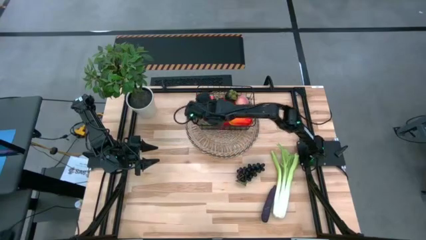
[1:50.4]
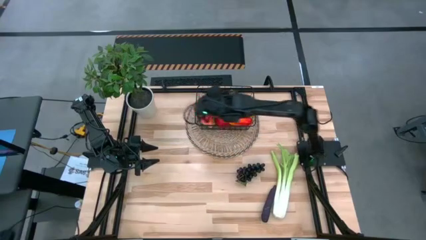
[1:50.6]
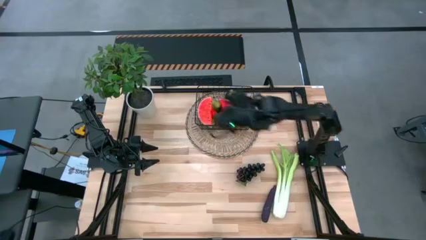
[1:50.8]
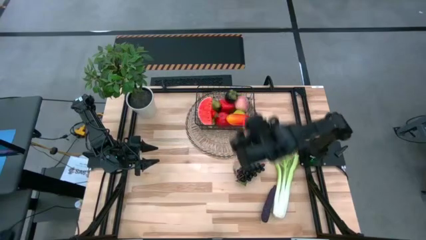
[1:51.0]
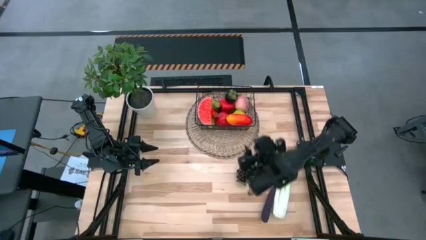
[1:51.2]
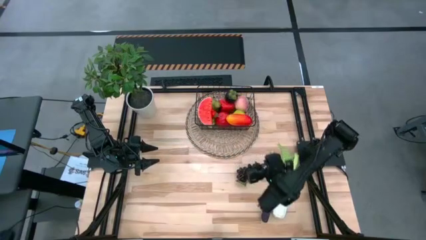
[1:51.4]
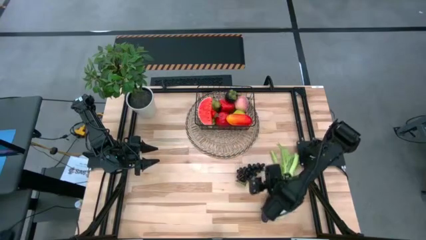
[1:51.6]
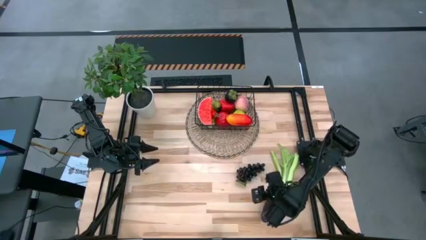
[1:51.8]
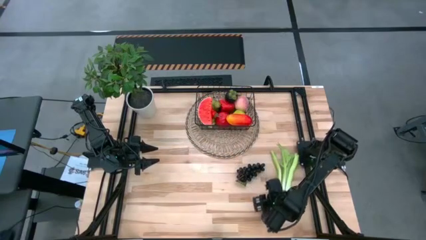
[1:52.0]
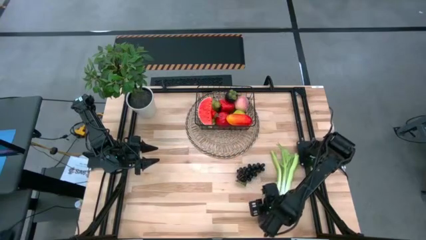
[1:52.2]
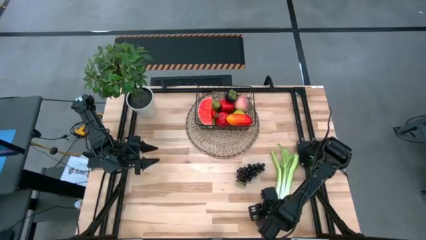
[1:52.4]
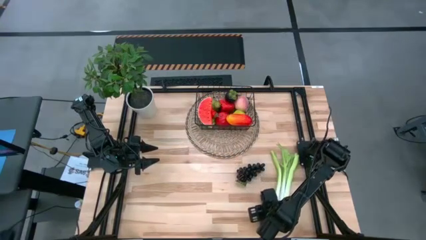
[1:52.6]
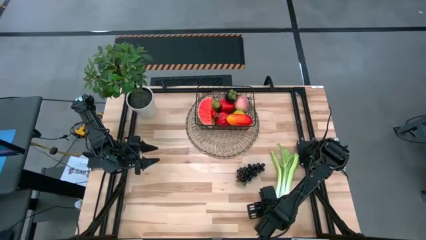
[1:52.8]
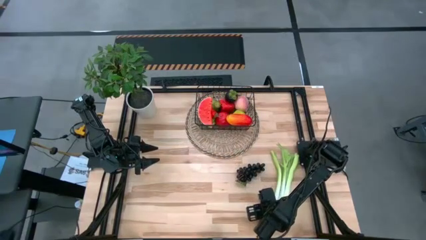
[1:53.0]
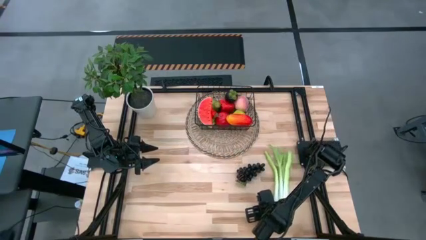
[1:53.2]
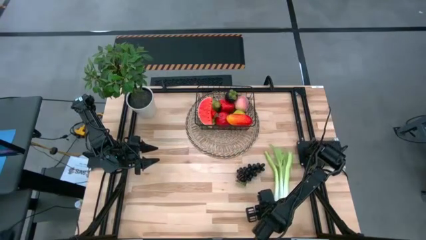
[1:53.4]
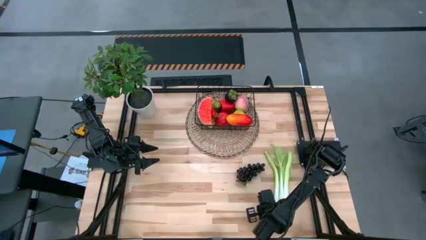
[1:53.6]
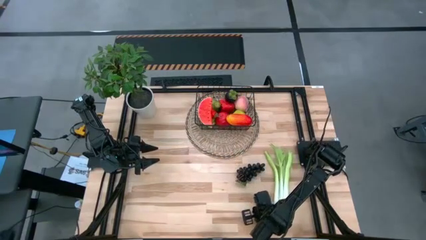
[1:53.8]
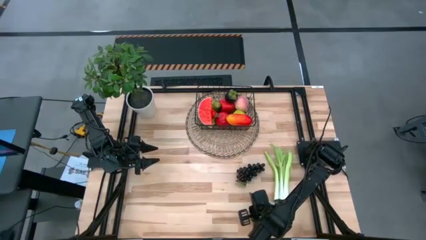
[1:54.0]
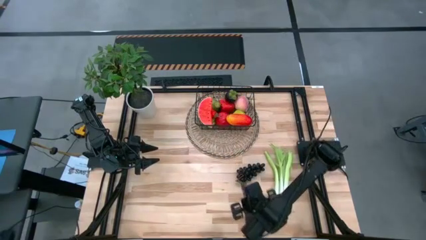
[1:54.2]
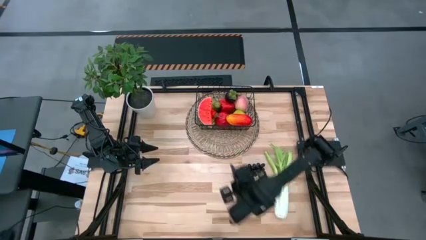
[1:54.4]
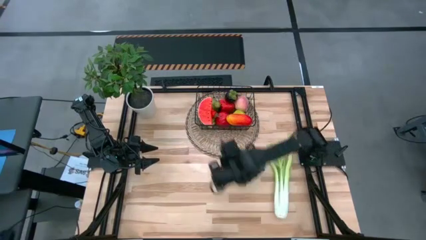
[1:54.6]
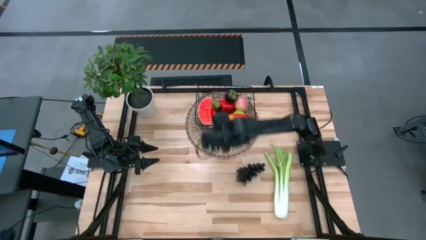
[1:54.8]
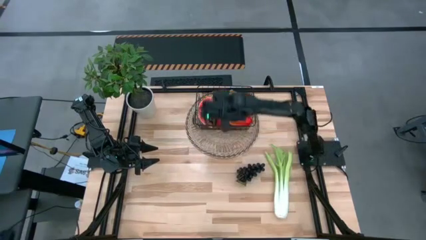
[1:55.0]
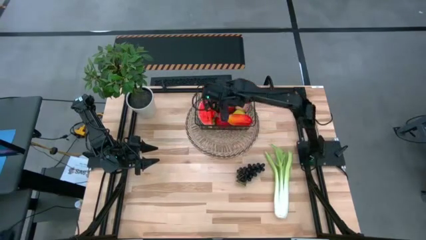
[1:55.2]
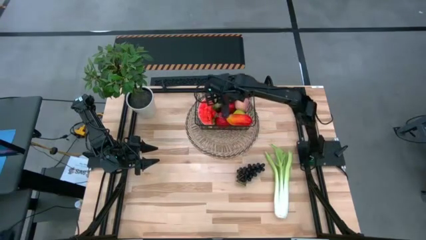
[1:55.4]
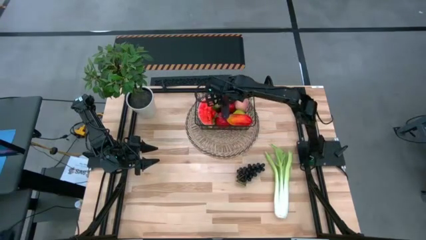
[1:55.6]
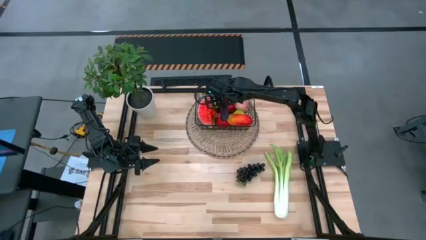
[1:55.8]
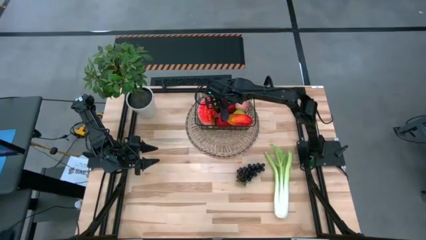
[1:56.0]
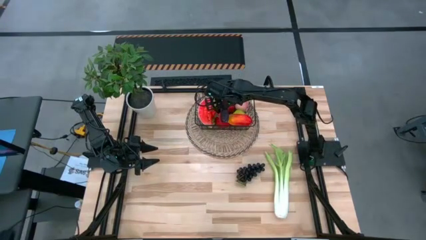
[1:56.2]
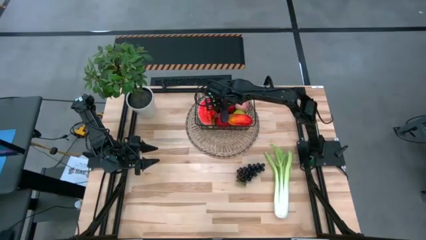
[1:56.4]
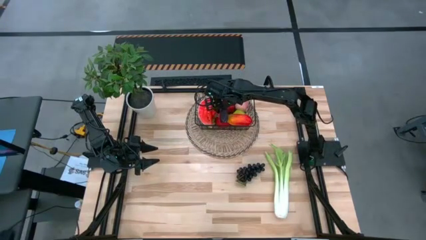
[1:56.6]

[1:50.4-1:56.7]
Task: Build produce basket
Put the purple eggplant into the black wire basket

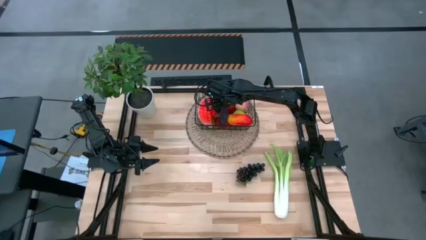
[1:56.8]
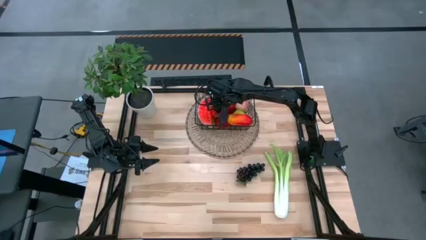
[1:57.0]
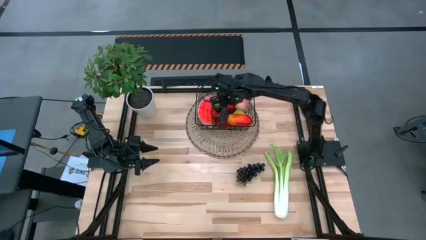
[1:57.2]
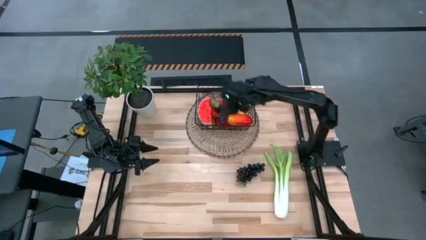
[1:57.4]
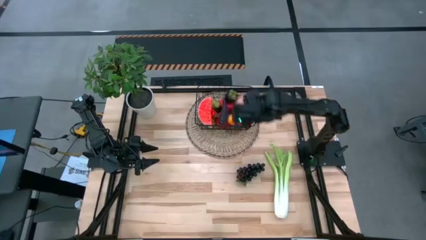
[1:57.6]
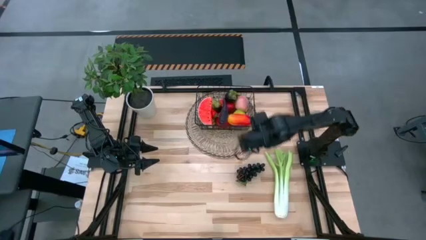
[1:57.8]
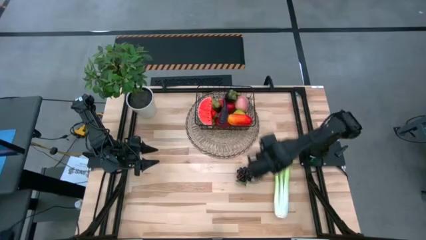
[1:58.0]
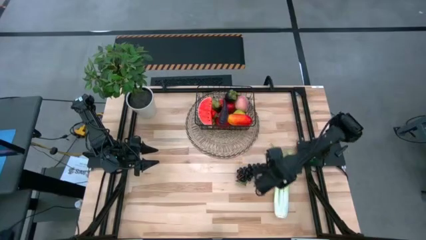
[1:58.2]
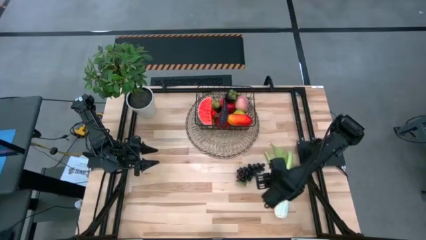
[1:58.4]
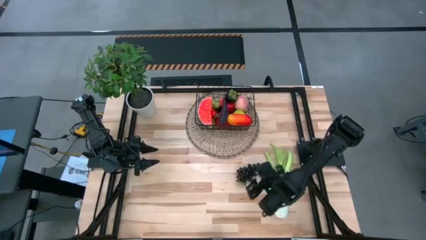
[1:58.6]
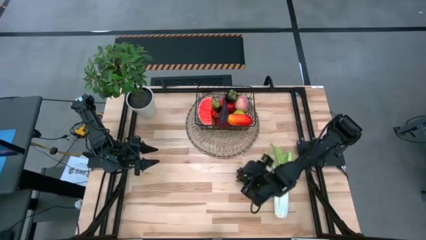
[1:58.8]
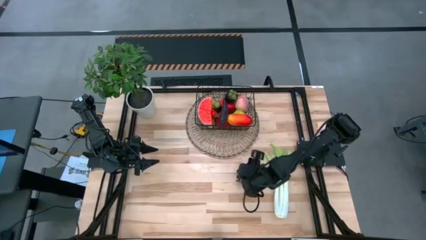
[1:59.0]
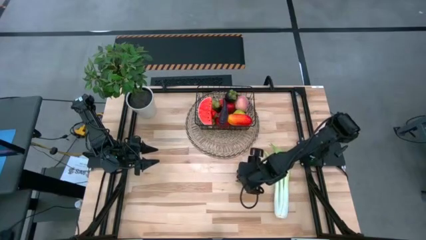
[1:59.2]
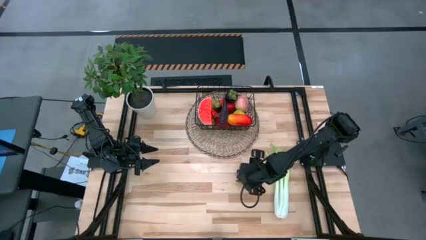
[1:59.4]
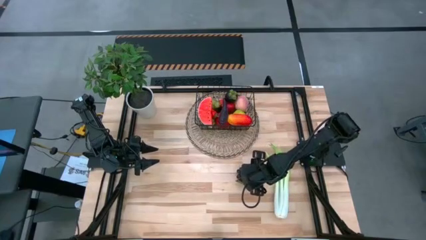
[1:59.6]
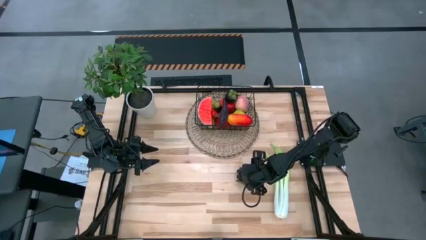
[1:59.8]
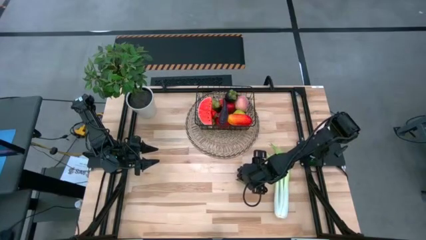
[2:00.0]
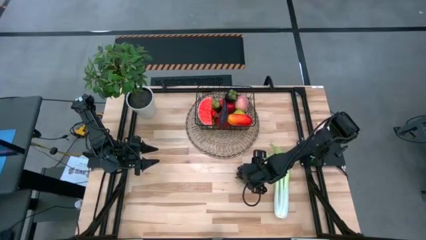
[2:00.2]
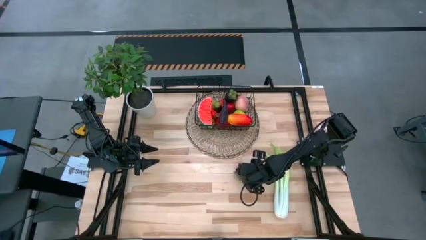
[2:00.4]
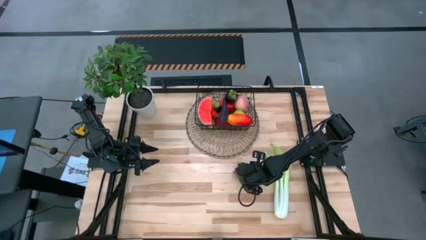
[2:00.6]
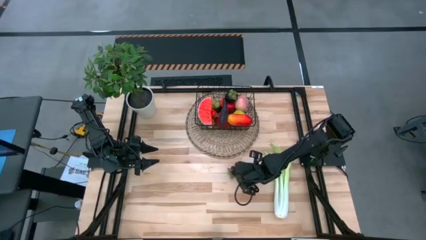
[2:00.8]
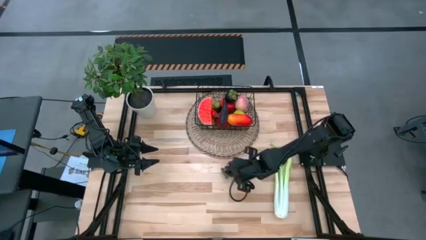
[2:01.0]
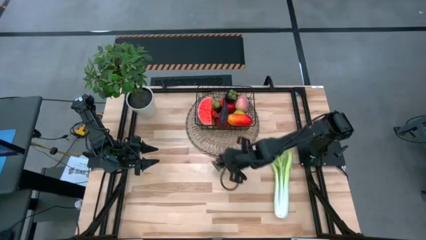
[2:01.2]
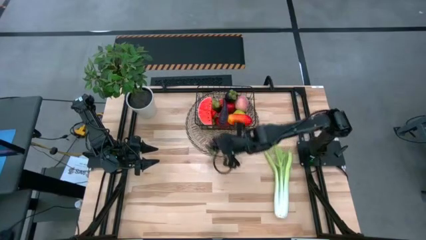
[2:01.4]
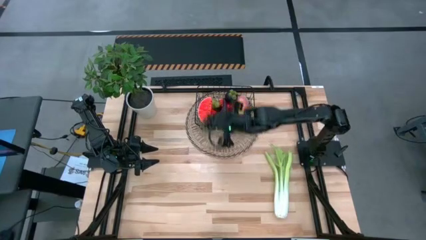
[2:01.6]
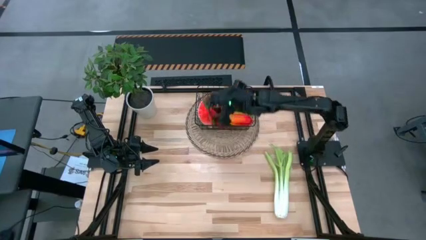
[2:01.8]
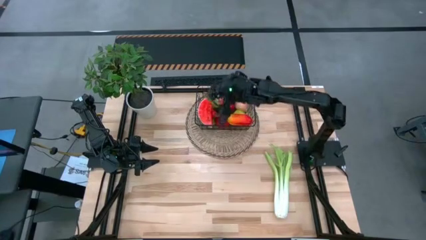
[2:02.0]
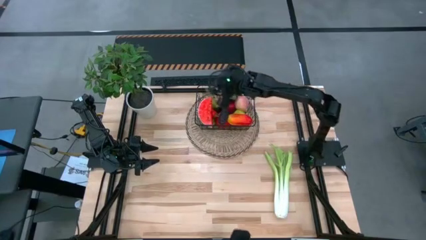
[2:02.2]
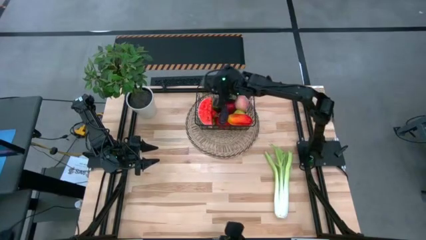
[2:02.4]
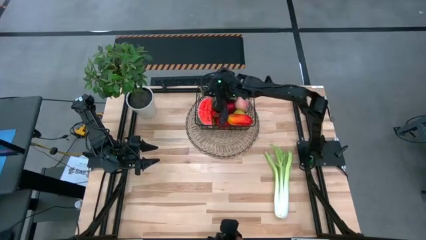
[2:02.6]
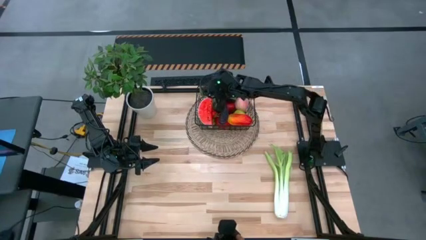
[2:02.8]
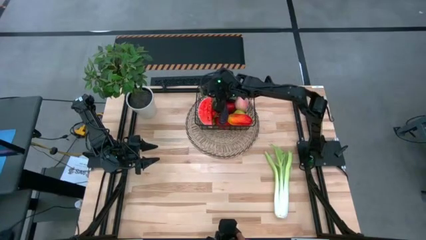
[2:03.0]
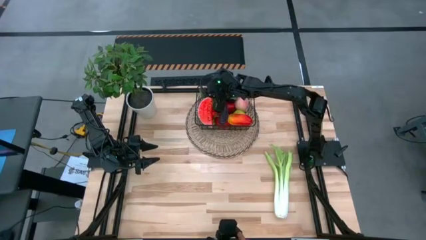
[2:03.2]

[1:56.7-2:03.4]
Put the purple grapes into the black wire basket
